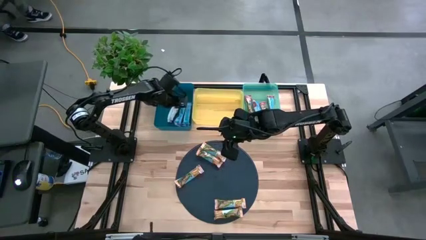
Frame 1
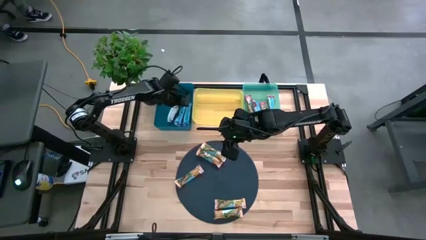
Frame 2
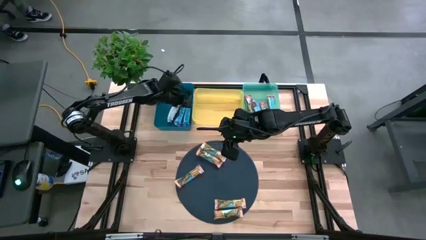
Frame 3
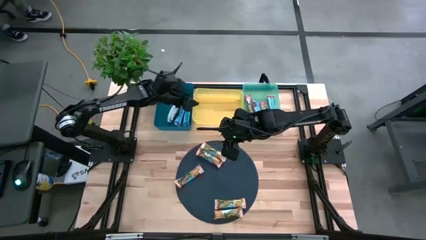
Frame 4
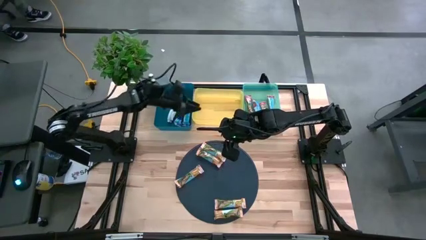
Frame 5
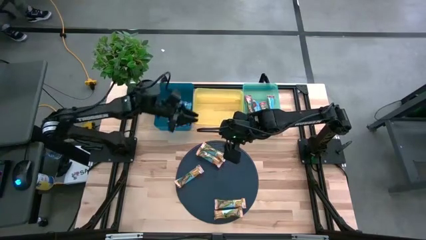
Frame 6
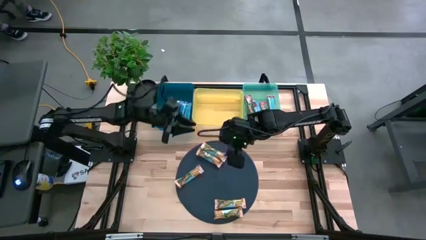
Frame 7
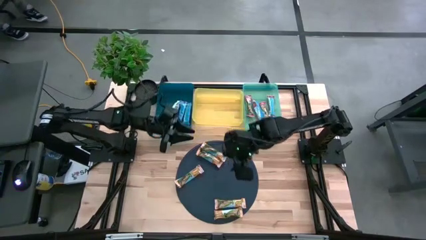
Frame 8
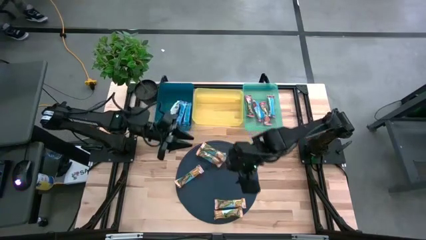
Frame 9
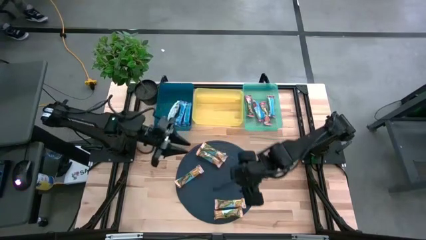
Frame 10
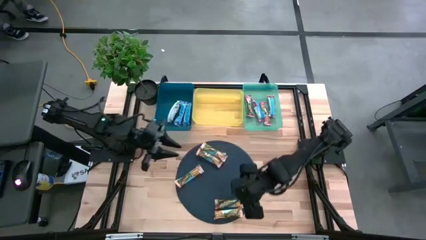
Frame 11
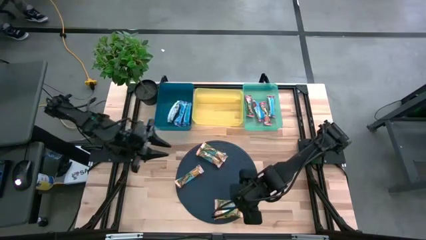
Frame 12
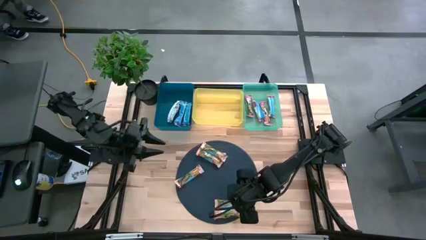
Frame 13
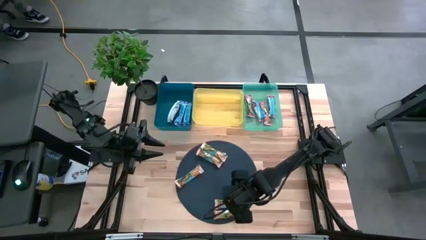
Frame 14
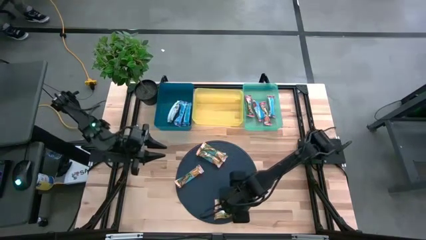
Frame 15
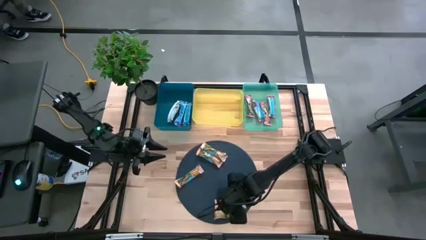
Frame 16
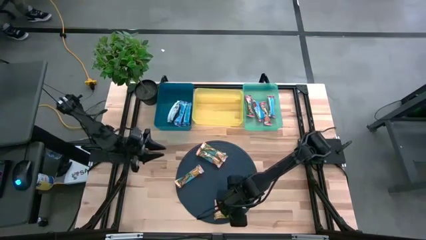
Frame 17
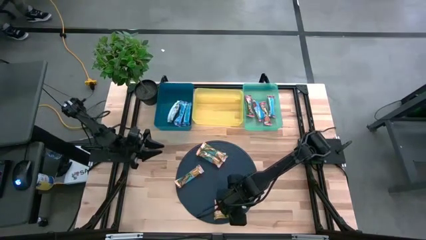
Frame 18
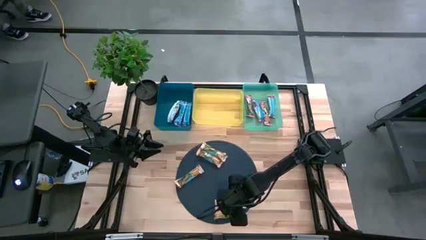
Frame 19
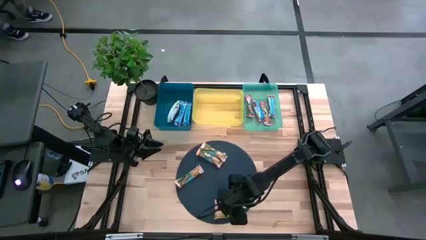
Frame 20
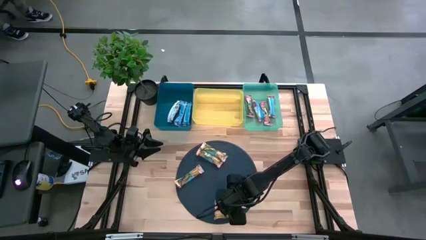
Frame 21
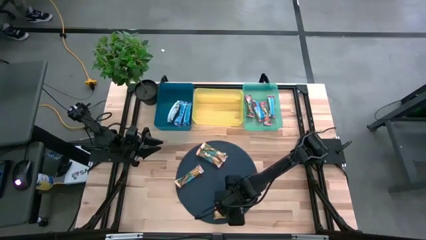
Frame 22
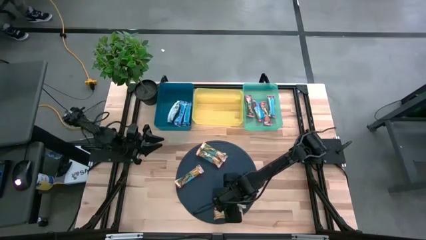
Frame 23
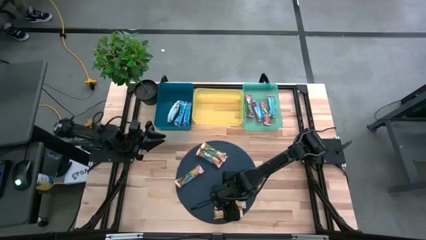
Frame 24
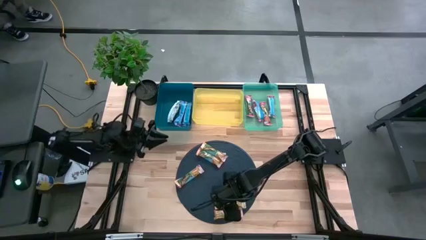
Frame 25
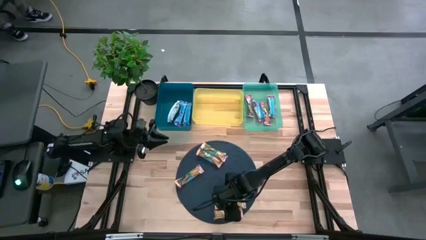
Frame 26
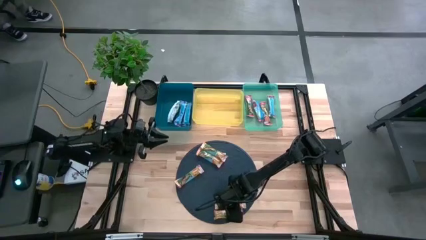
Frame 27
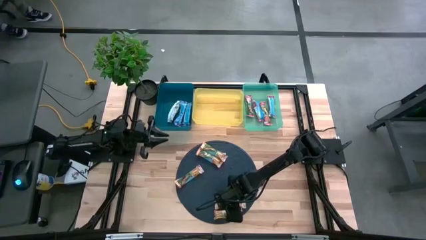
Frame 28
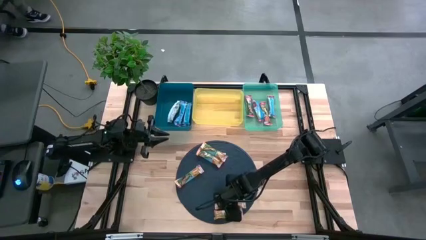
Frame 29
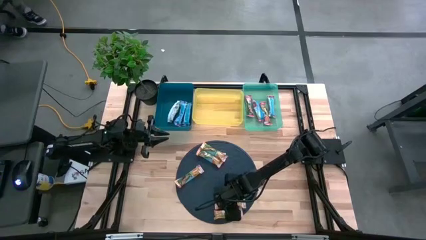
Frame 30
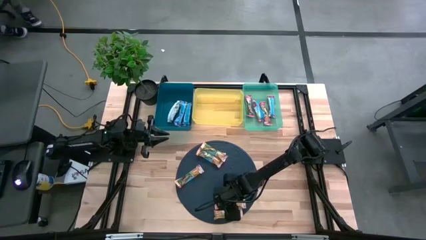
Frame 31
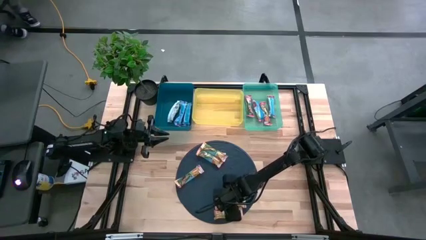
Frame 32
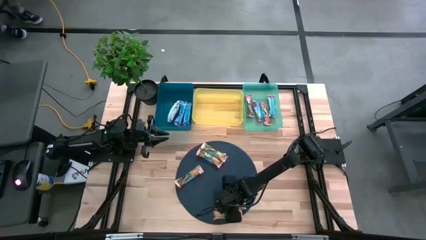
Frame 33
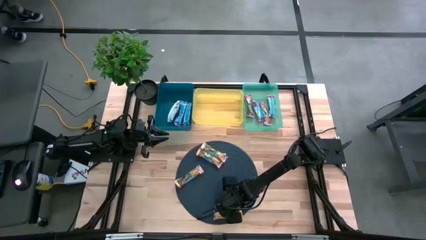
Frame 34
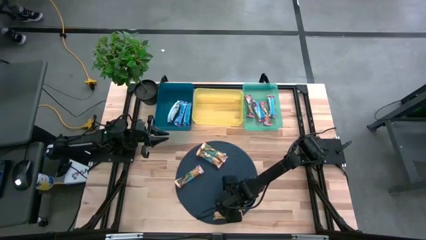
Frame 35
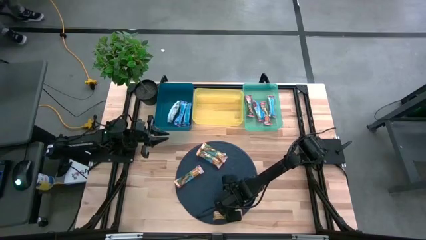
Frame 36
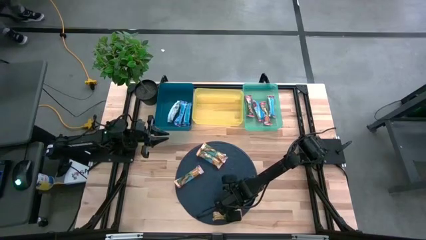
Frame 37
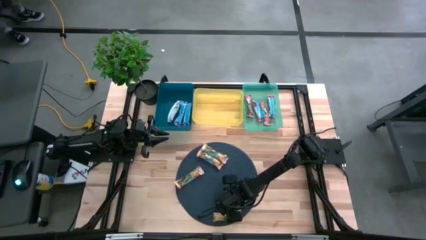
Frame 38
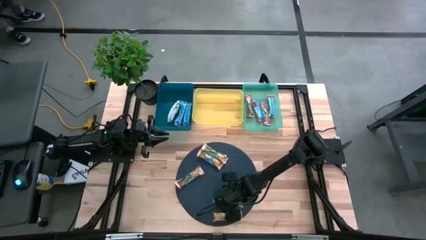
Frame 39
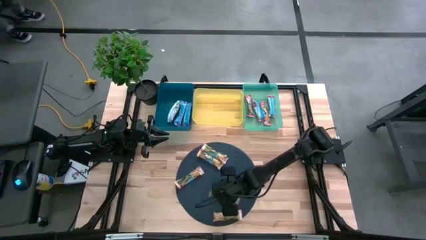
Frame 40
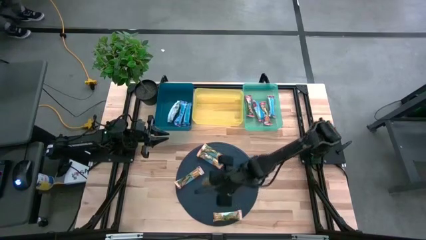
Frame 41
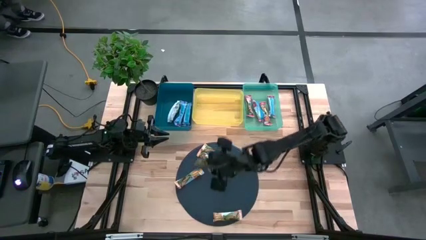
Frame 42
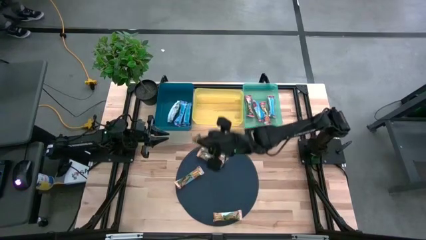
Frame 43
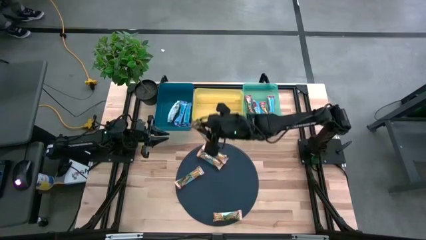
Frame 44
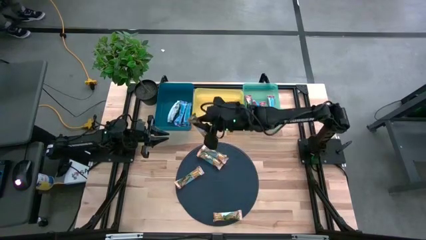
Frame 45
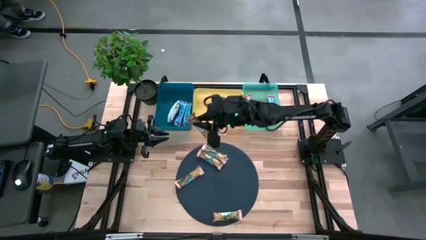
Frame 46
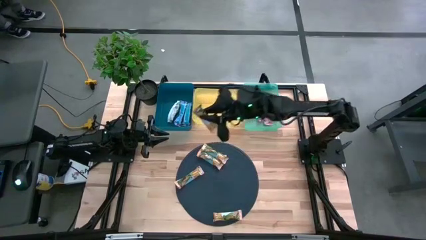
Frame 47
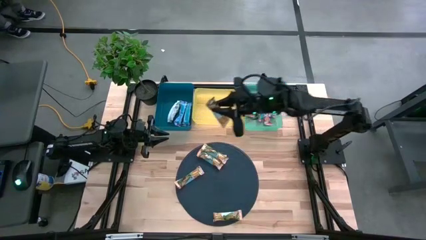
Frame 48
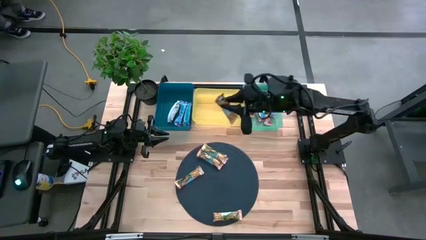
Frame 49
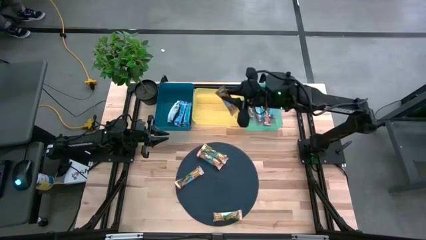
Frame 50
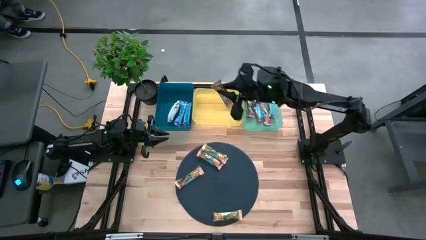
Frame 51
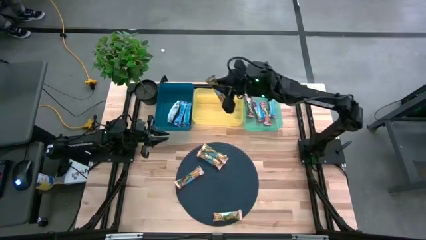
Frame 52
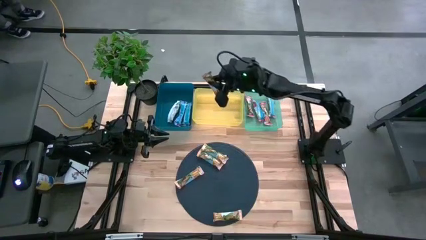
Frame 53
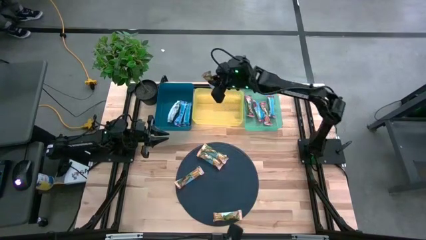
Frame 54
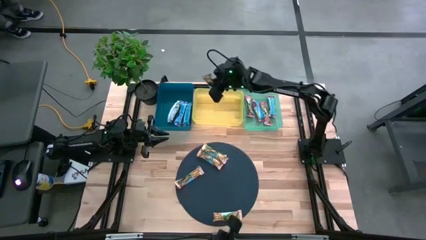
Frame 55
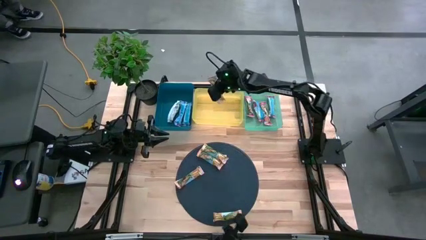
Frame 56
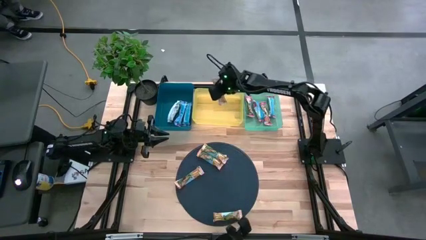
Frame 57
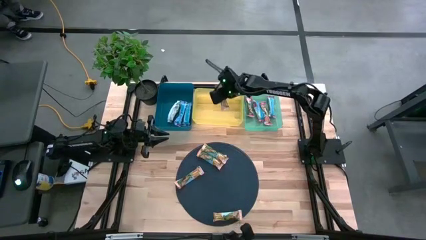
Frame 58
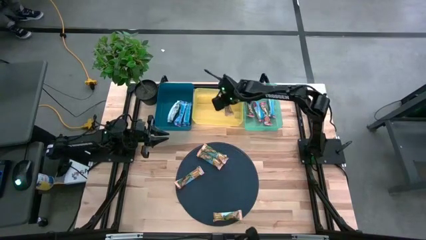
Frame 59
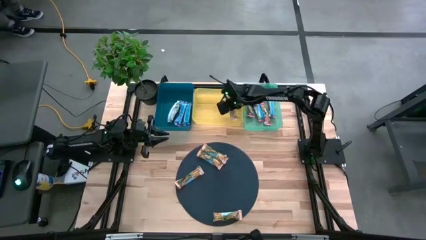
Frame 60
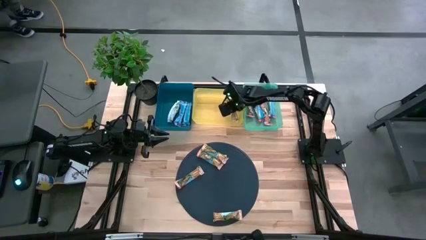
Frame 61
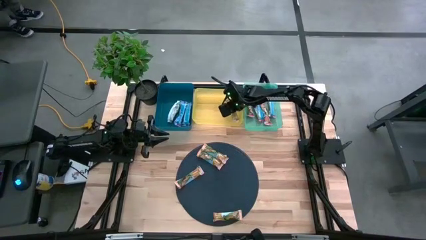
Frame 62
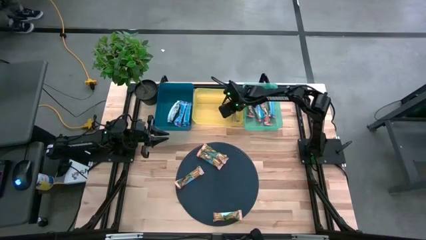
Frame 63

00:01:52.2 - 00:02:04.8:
Task: Pick and place Granola Bars by type
Put the yellow granola bar into the yellow bin

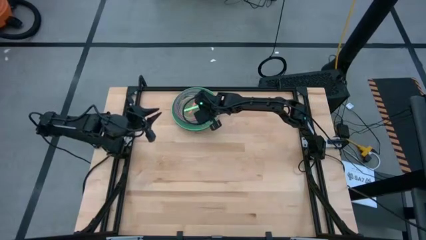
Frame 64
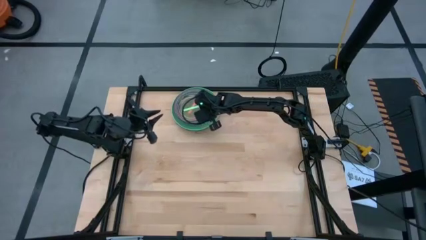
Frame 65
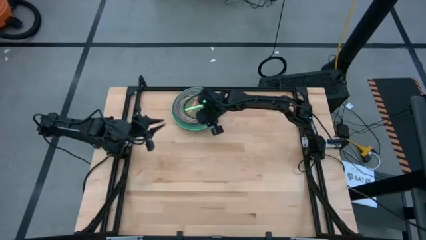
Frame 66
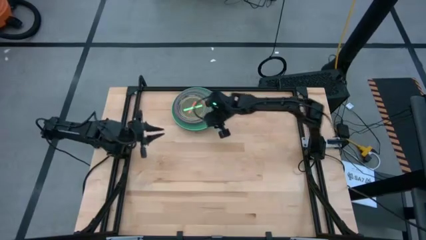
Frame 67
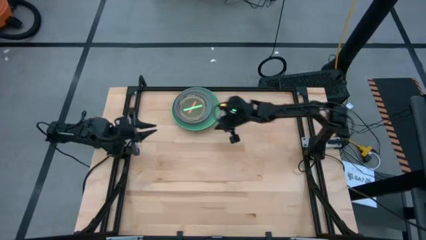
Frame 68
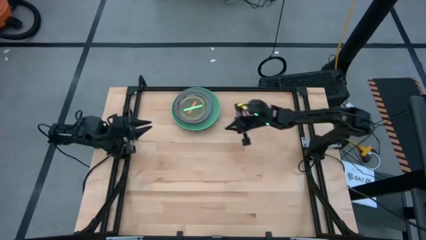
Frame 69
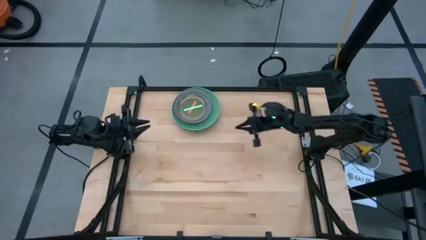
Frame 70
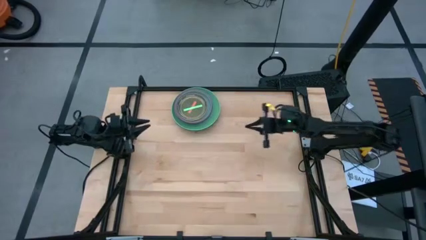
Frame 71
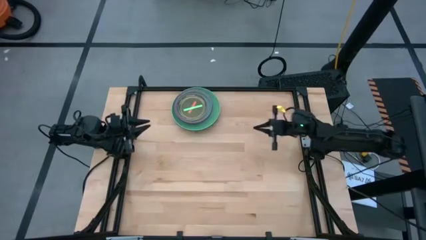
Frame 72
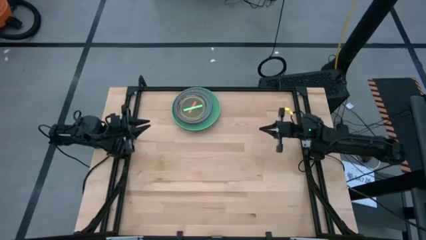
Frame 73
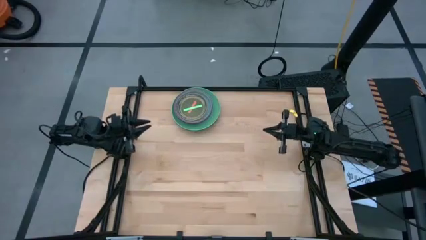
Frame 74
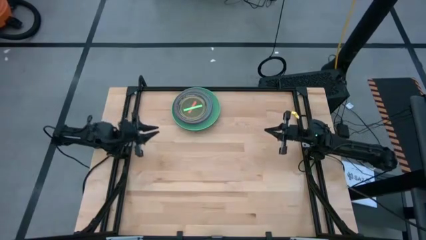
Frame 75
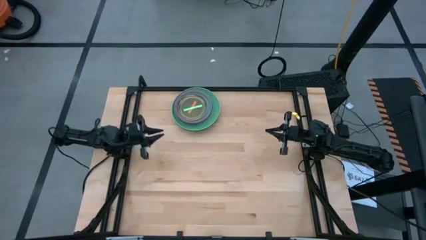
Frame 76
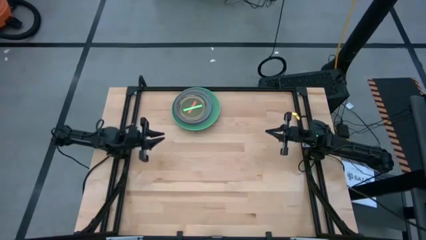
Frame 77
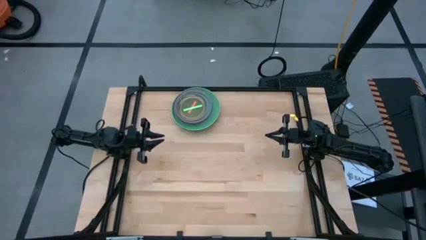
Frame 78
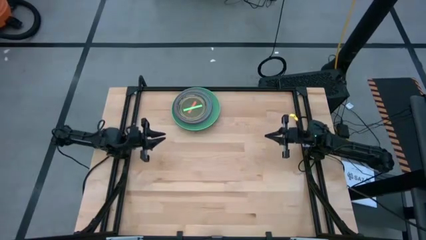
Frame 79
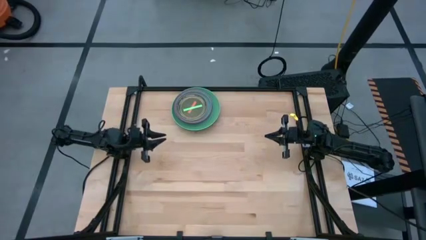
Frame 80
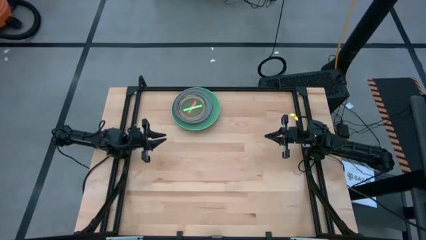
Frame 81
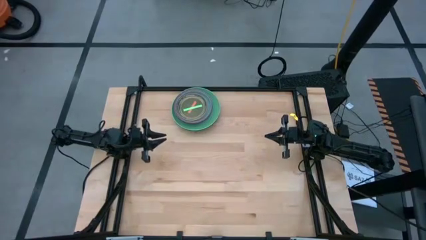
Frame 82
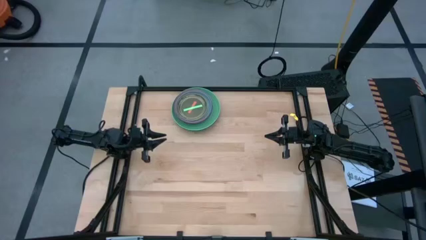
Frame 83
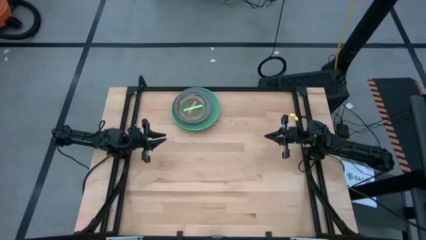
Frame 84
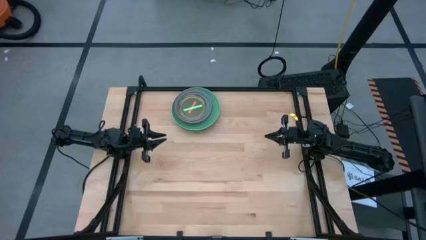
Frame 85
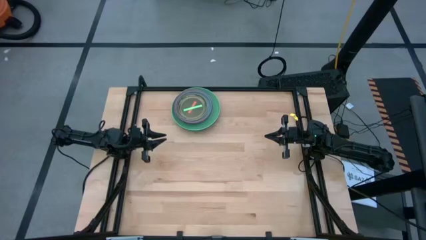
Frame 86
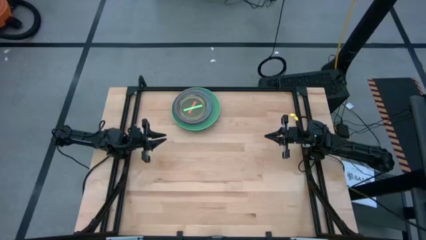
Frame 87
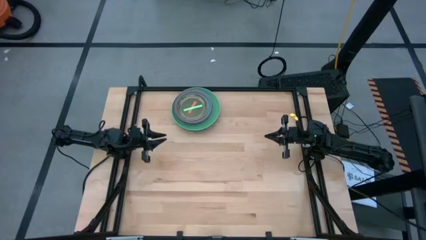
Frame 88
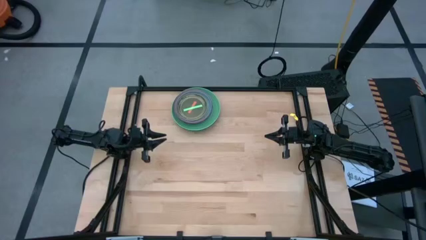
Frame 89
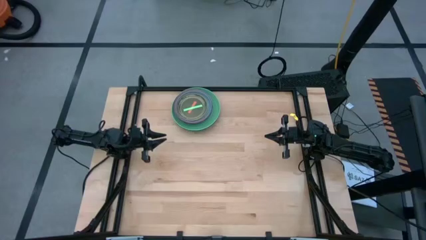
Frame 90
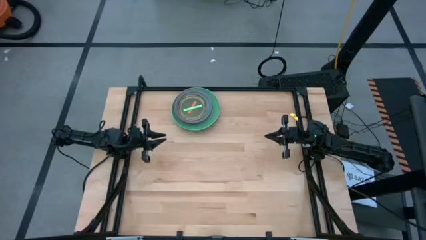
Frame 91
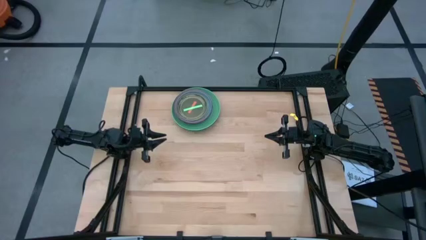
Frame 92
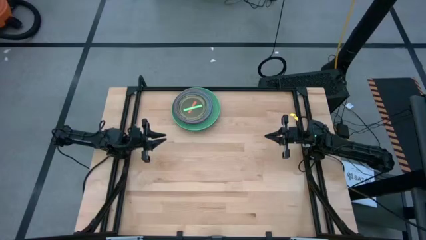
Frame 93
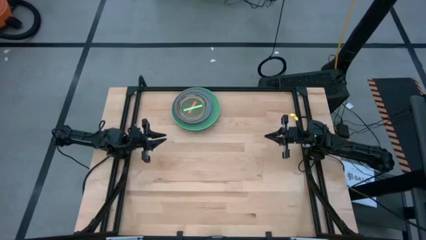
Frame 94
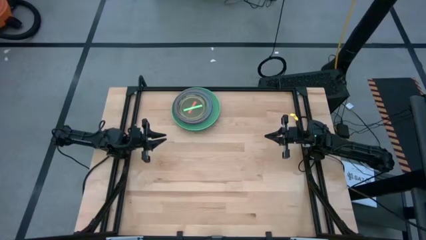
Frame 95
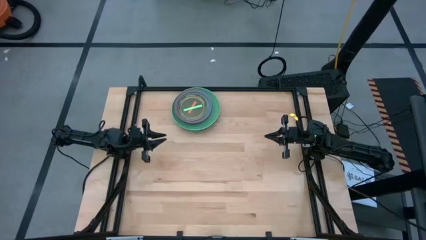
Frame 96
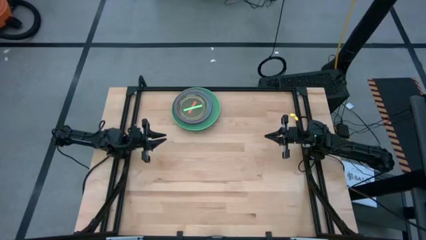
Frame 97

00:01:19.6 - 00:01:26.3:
Task: Stack plastic plates
Return to Home Position
